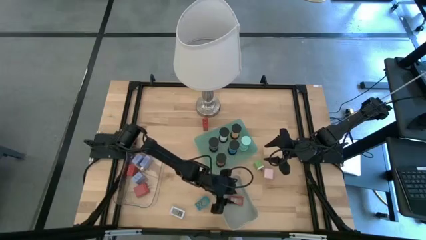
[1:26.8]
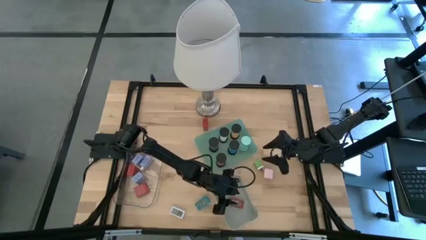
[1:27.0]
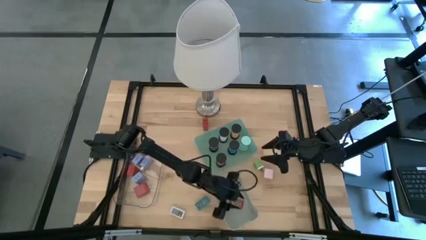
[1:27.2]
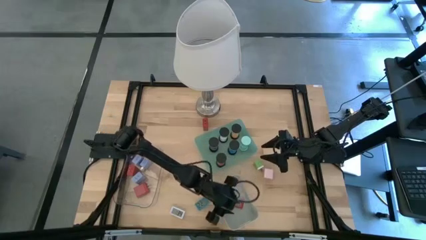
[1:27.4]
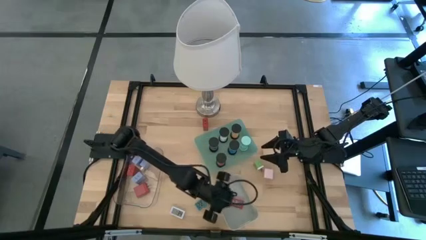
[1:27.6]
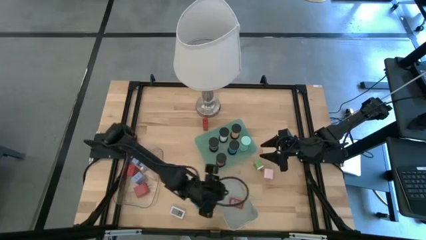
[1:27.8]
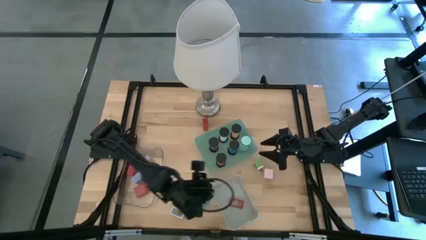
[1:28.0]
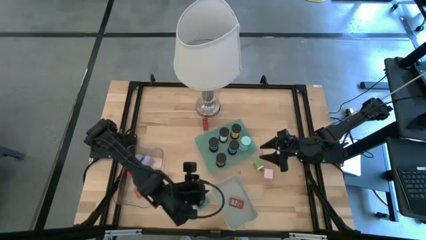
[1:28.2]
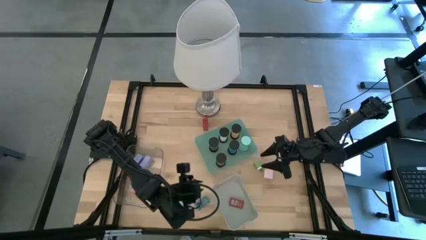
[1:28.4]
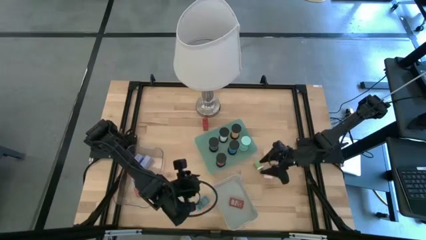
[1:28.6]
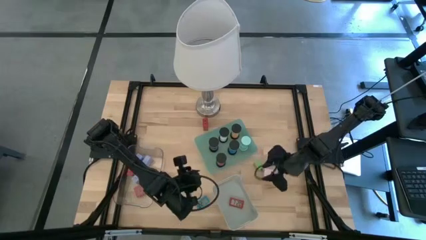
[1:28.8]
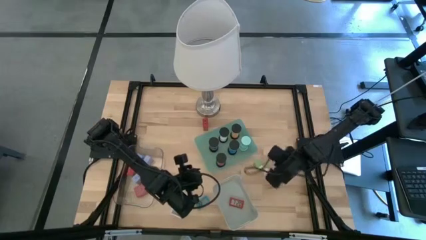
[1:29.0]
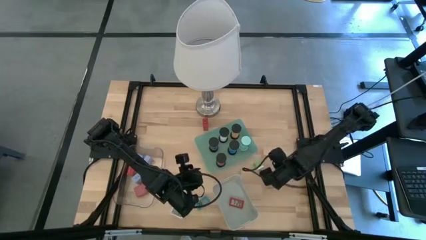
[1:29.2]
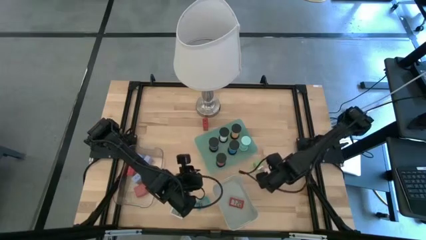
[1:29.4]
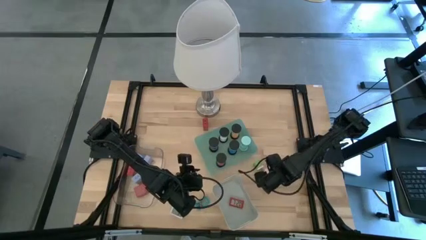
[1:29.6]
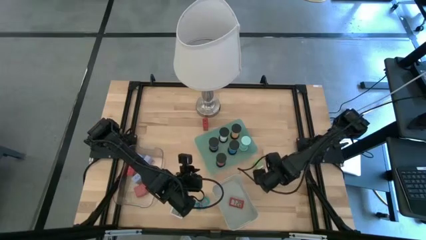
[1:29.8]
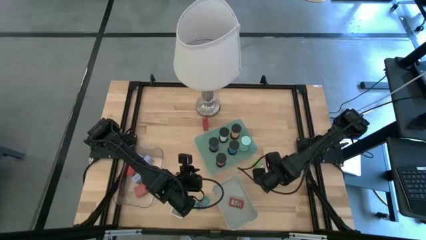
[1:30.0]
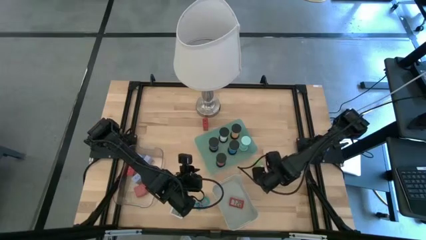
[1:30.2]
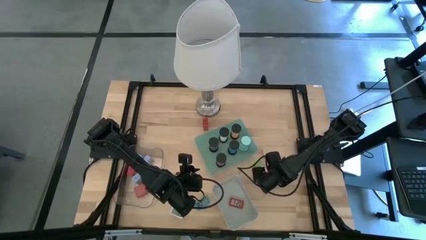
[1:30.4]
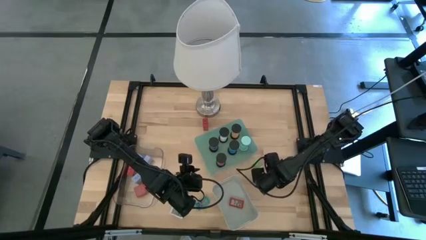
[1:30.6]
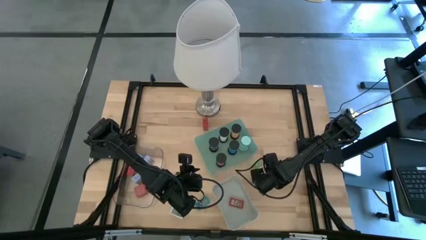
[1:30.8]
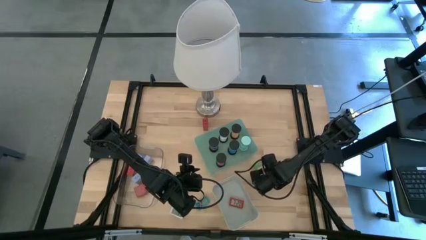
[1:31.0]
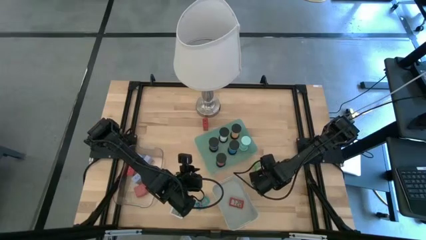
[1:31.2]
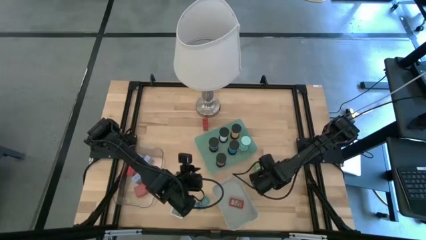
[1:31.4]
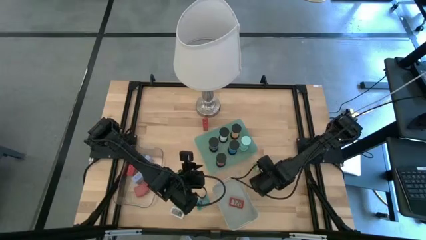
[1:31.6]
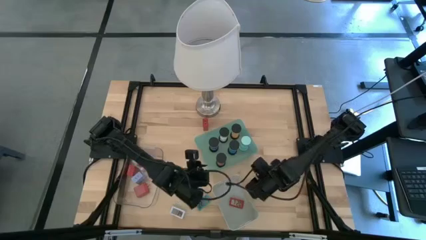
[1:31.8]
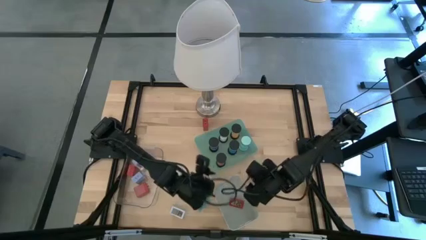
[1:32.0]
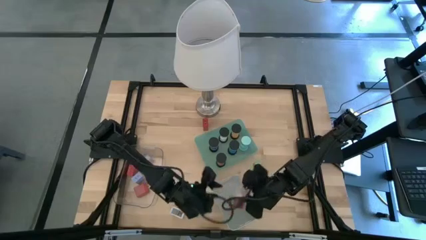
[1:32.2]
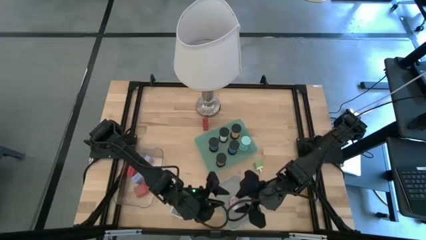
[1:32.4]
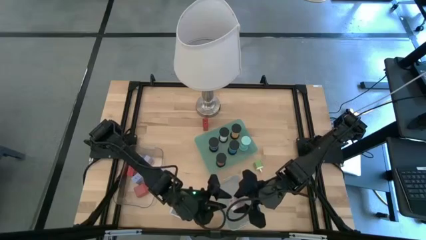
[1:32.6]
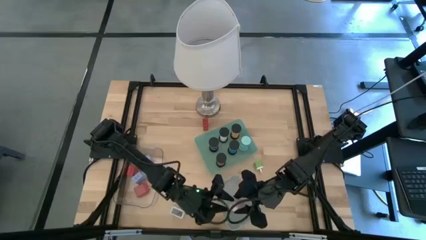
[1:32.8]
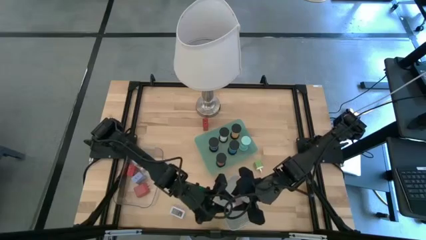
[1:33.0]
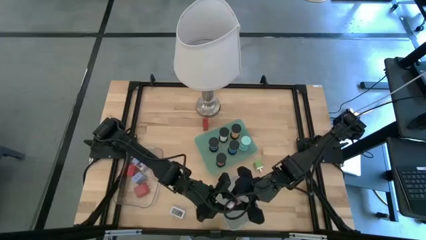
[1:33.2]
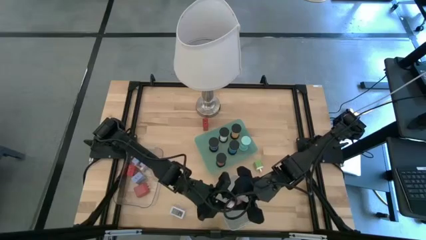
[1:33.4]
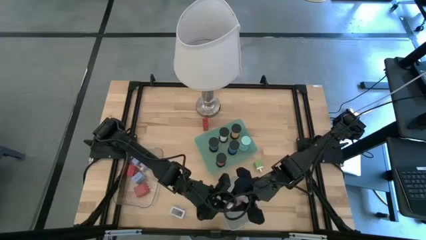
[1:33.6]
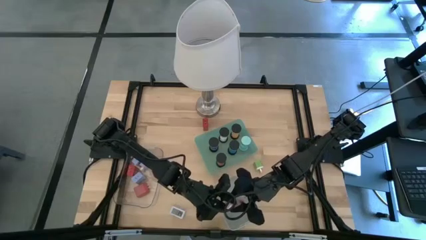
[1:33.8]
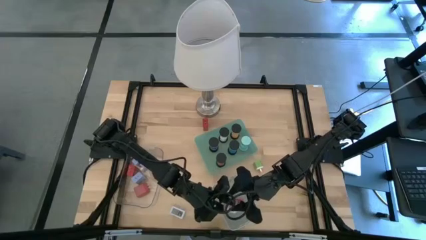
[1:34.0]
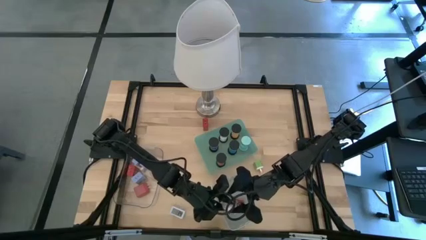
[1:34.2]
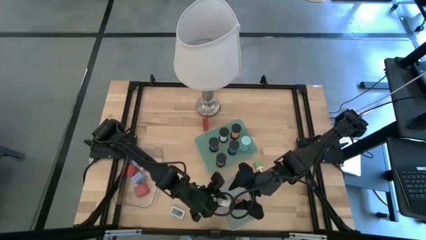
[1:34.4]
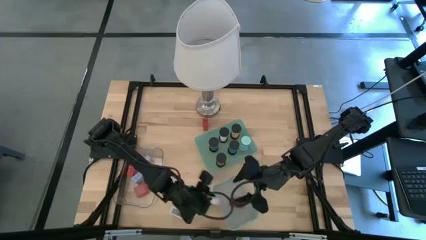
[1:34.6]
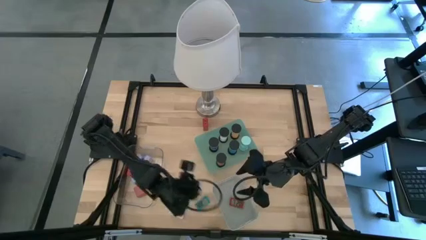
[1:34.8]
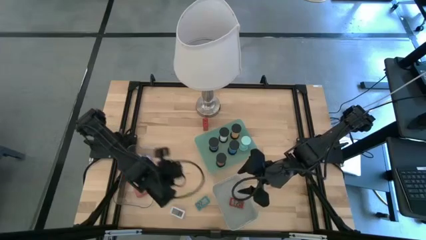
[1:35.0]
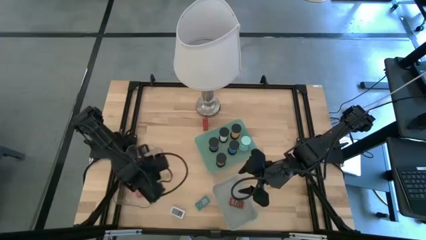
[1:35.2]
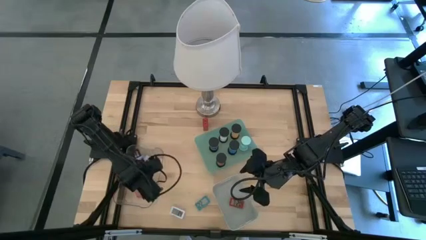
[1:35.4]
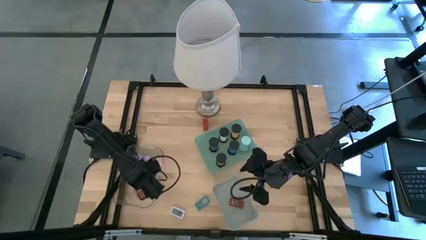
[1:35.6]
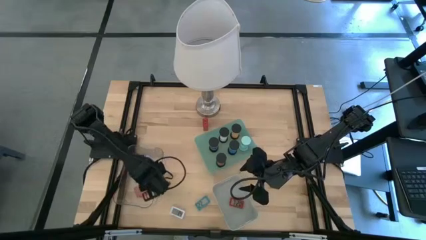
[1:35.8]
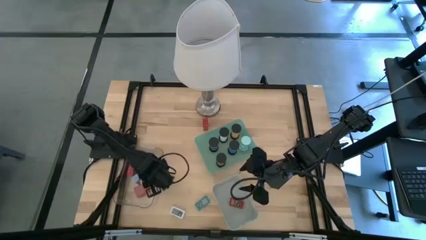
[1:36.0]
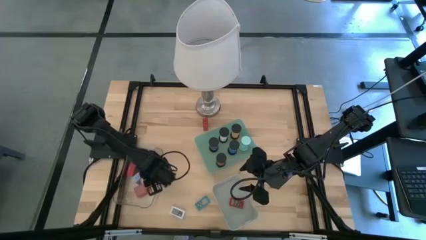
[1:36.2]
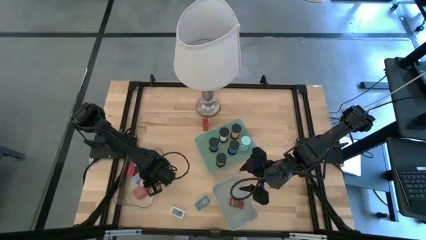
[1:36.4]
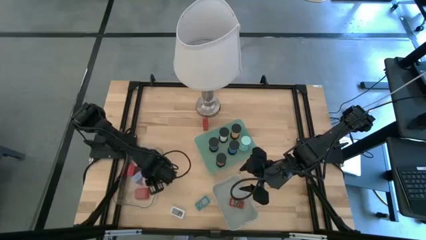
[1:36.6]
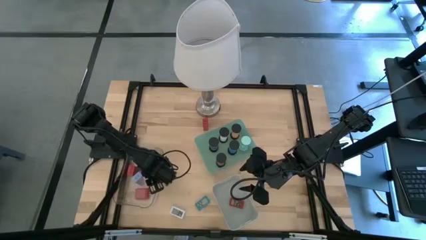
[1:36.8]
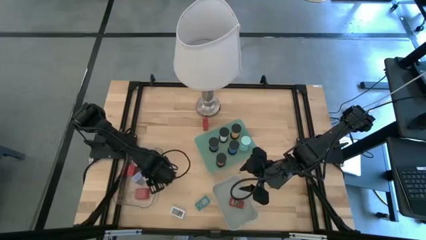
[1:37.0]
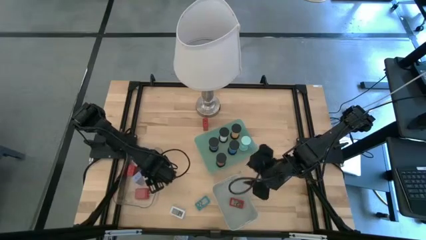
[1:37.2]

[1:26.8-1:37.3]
Task: Pick & Place Office items
Put the white charger adapter into the transparent bin

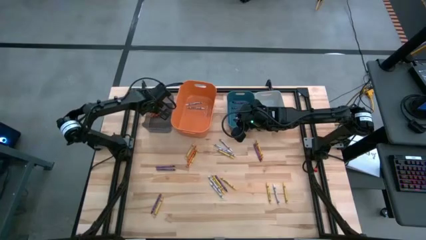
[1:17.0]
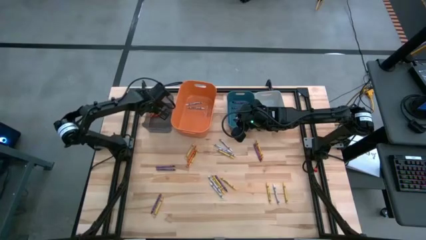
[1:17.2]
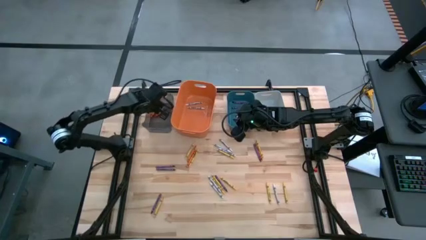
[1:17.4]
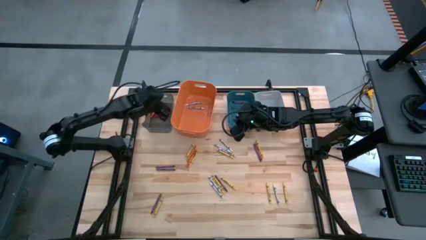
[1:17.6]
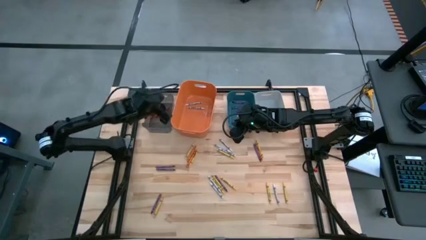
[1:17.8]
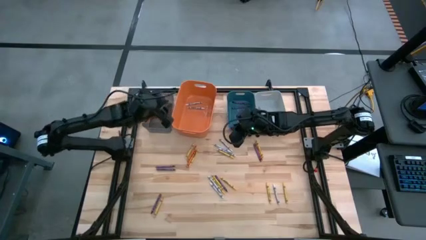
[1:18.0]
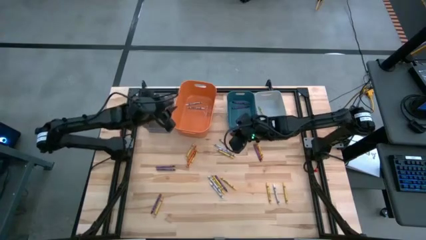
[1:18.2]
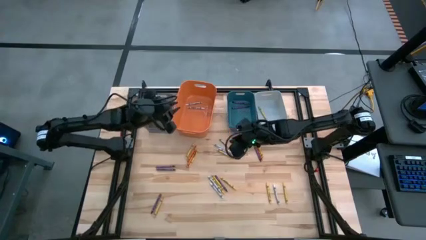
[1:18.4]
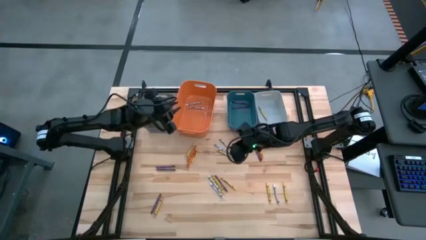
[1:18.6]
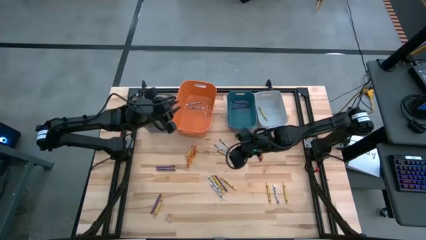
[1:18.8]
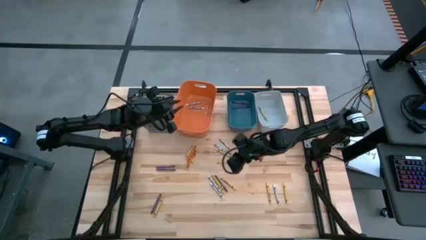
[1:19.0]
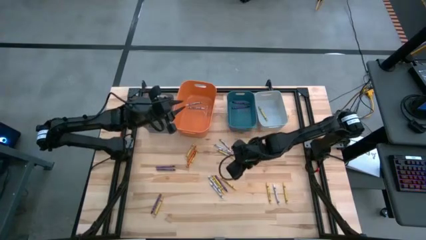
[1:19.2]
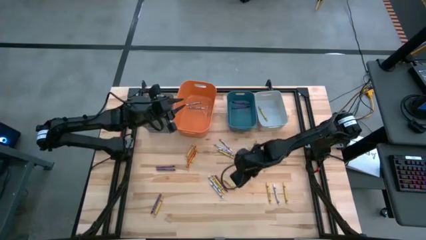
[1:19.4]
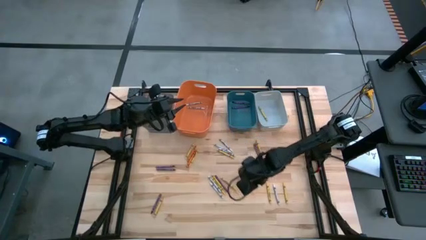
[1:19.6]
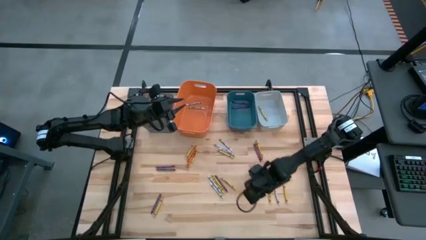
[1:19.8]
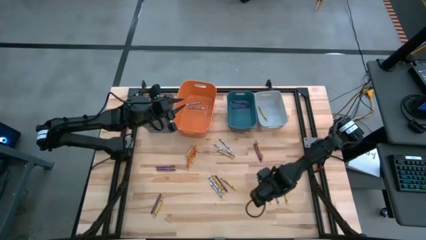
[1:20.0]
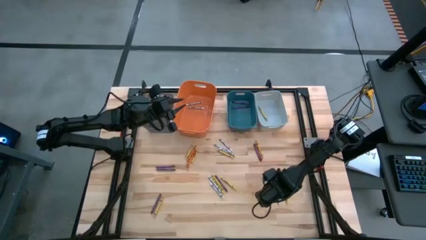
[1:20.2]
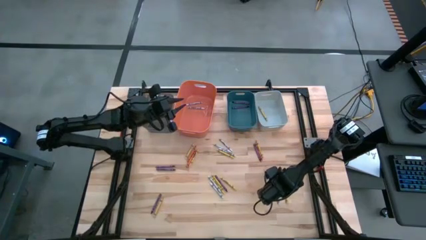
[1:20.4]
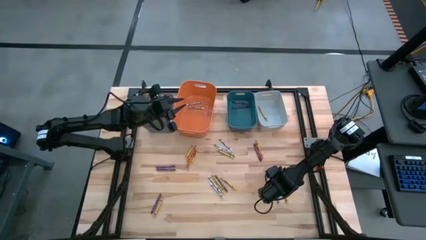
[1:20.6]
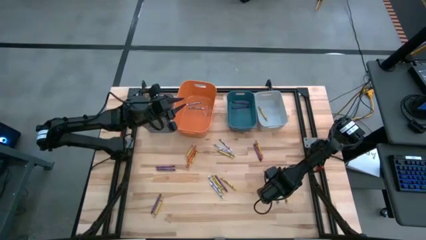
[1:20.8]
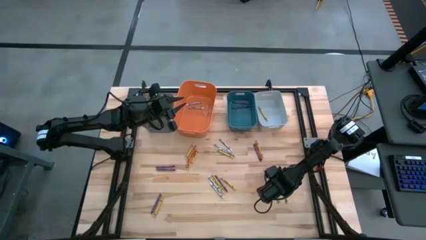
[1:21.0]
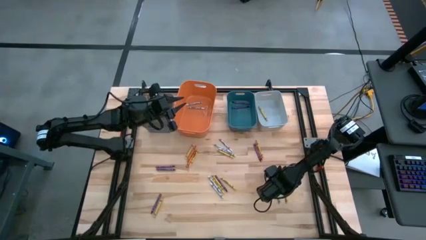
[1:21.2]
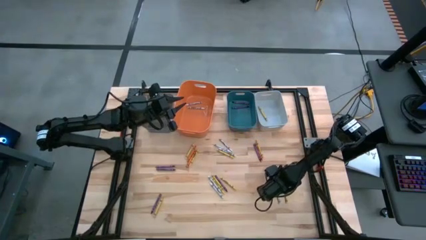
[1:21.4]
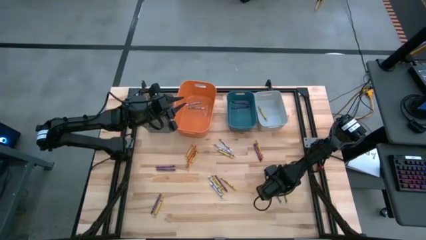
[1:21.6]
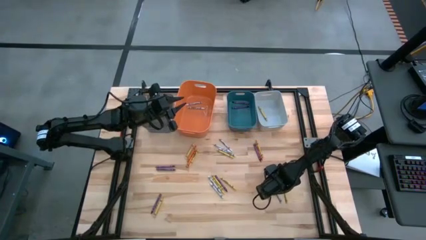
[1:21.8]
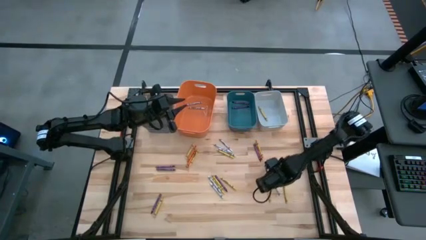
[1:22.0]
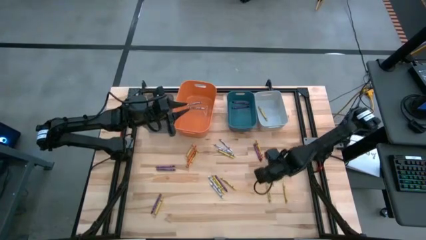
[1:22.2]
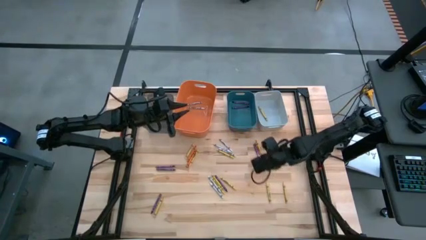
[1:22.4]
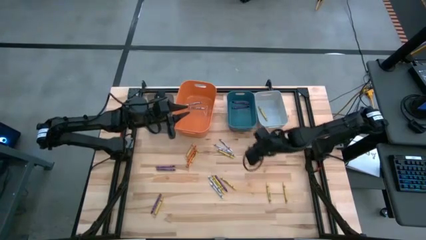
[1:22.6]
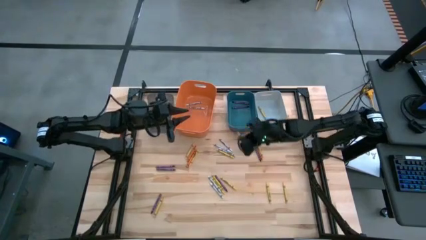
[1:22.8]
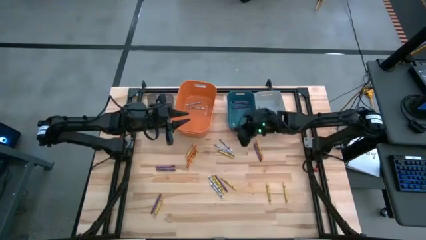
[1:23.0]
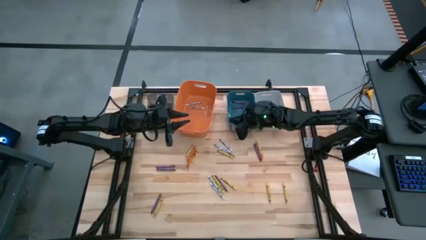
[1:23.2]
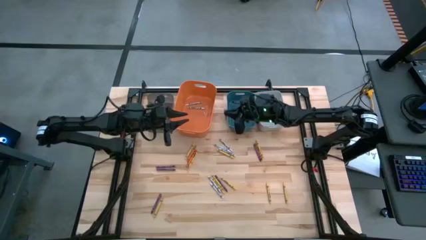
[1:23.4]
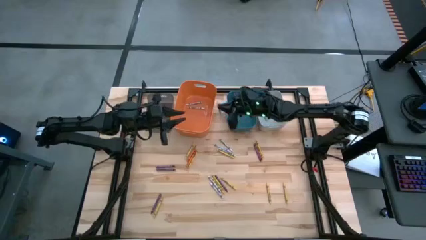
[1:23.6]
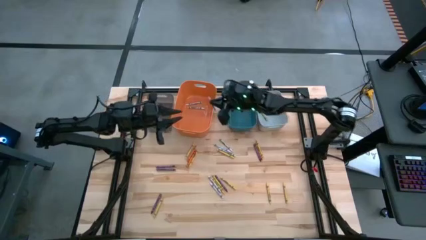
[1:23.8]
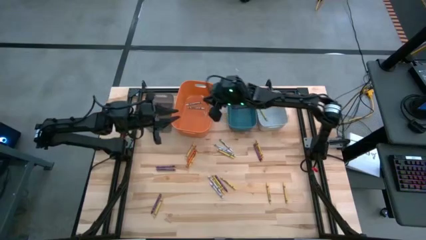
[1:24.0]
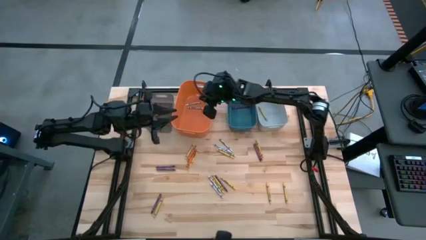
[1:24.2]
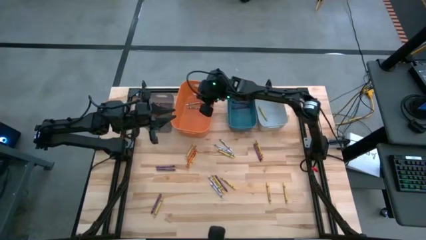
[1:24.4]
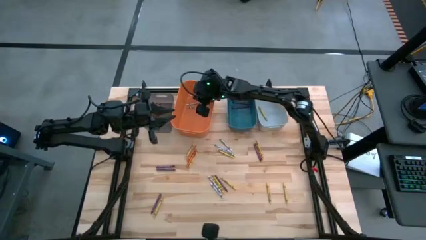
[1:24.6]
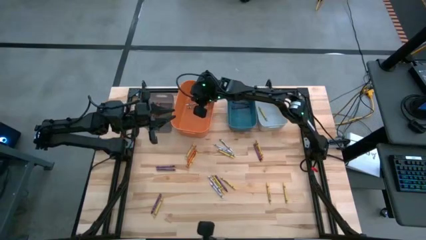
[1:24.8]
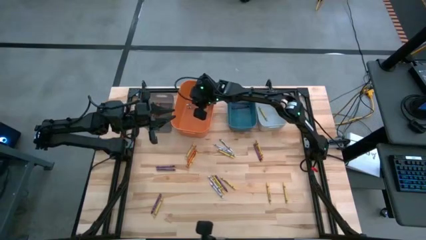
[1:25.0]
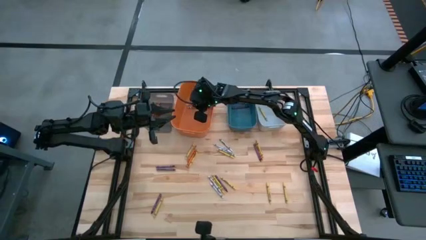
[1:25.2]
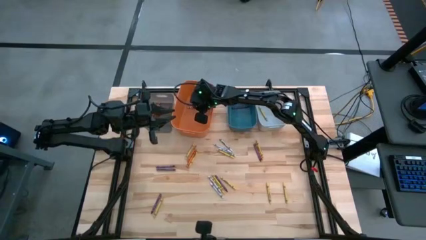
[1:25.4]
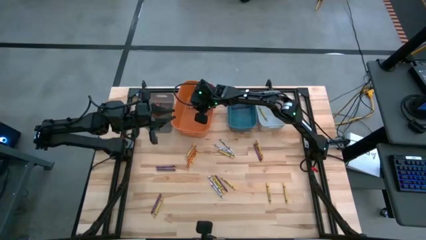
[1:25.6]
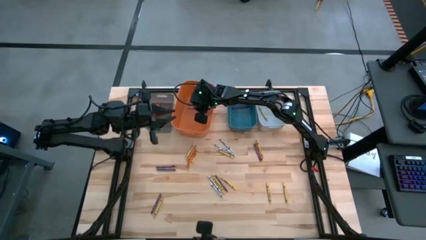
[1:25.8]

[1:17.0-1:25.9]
Task: Sort crayons
Put the white crayon into the orange bin
